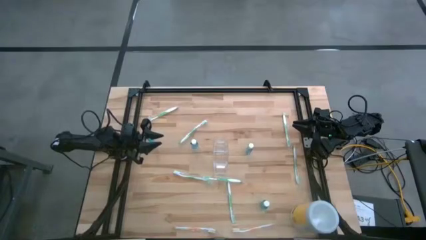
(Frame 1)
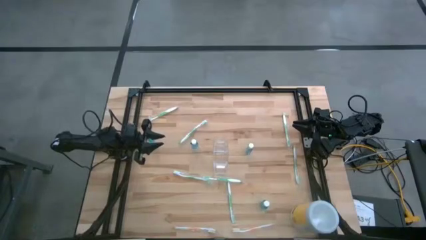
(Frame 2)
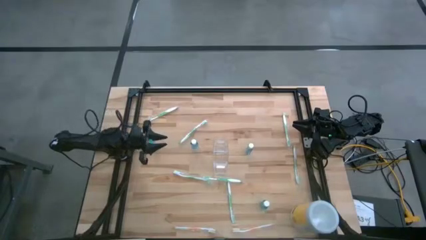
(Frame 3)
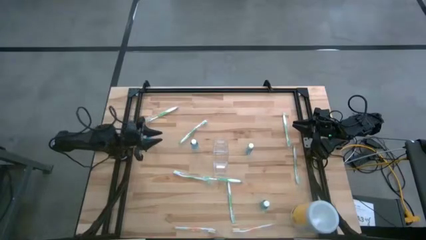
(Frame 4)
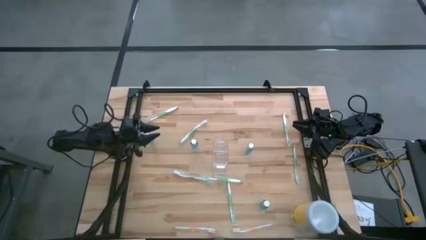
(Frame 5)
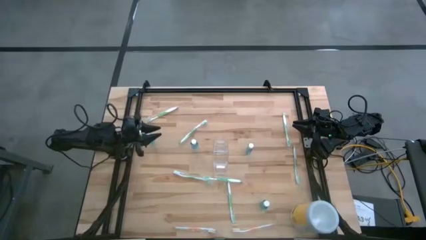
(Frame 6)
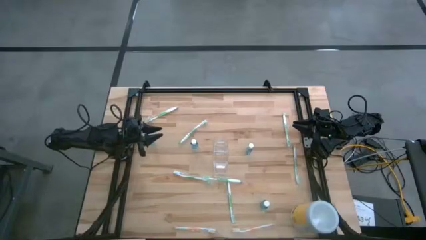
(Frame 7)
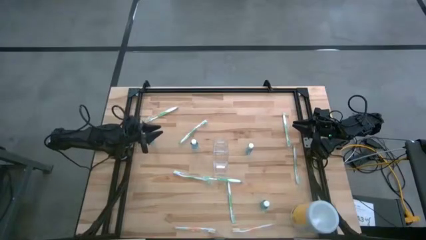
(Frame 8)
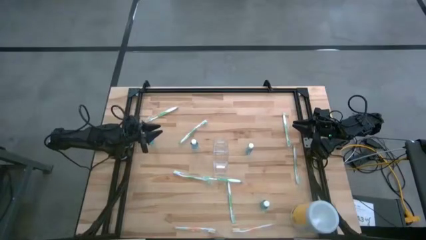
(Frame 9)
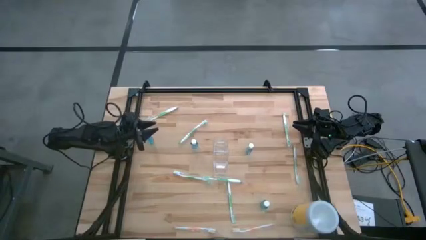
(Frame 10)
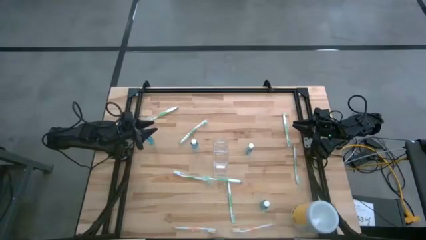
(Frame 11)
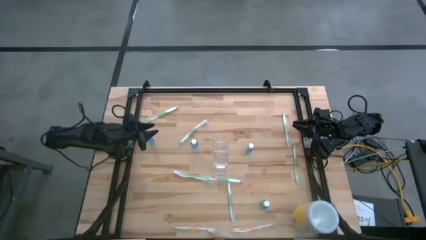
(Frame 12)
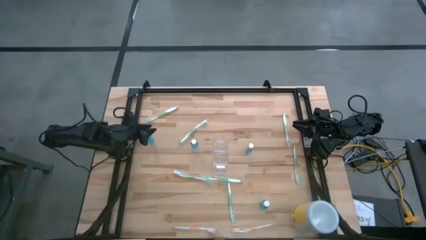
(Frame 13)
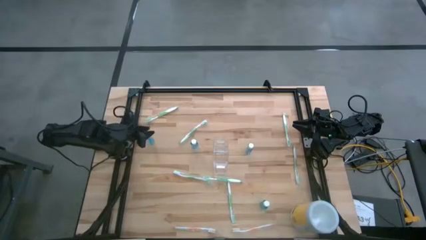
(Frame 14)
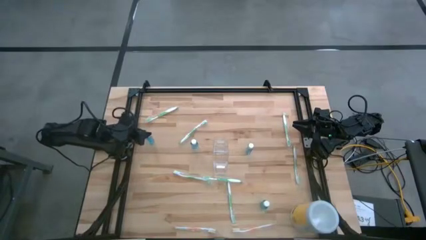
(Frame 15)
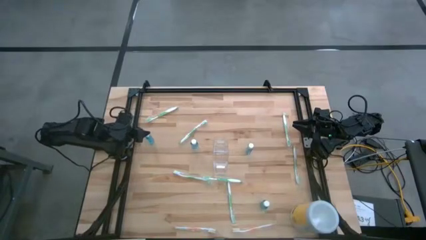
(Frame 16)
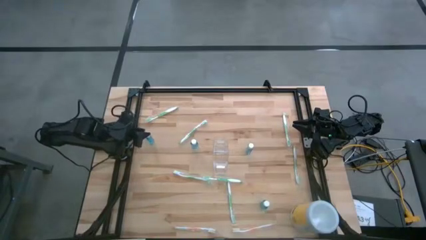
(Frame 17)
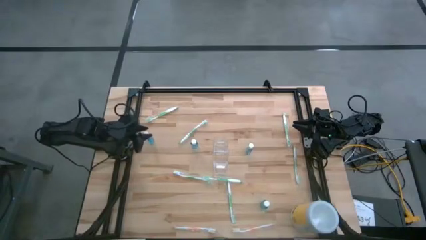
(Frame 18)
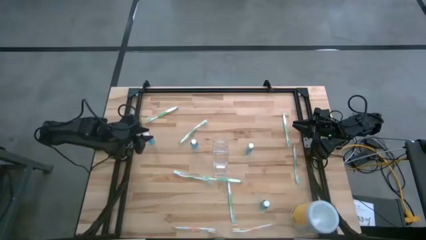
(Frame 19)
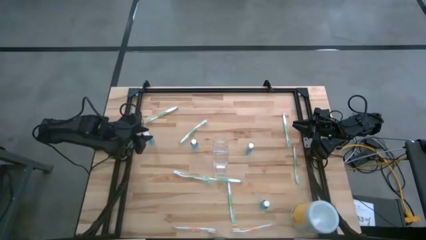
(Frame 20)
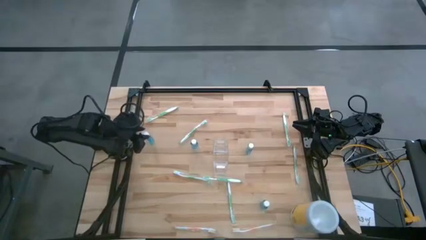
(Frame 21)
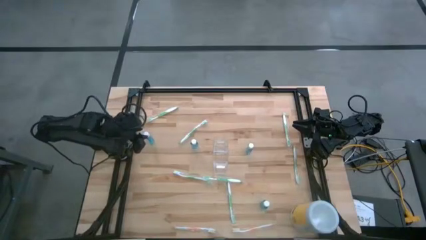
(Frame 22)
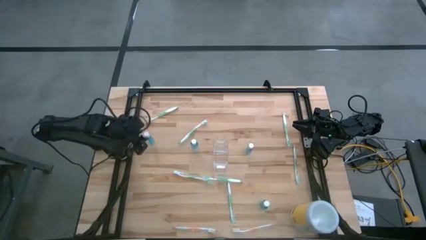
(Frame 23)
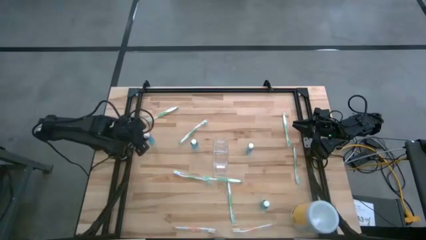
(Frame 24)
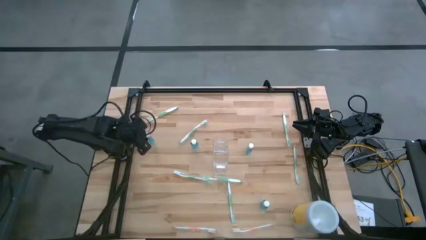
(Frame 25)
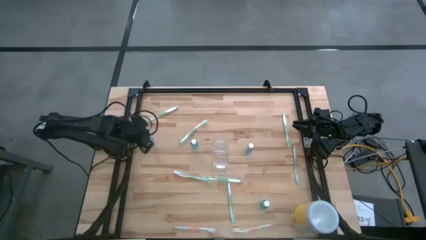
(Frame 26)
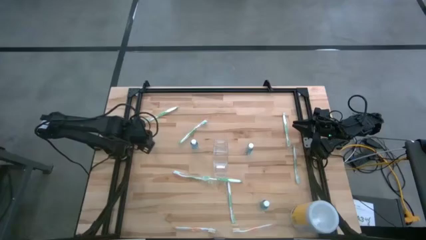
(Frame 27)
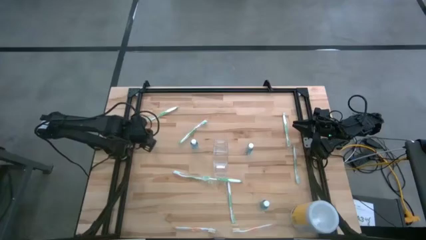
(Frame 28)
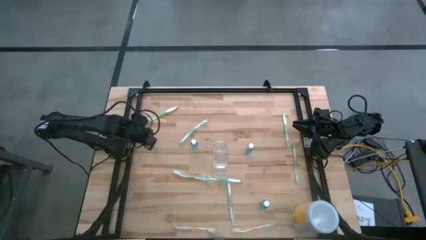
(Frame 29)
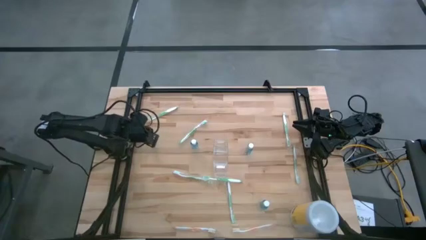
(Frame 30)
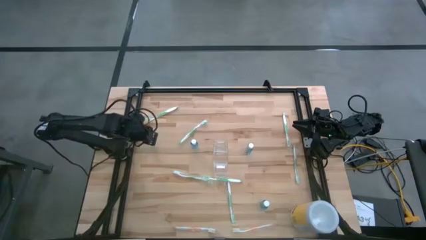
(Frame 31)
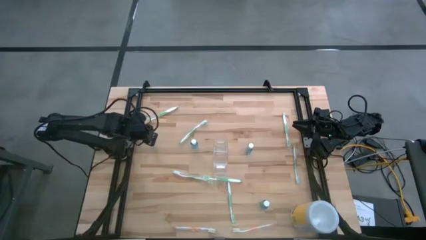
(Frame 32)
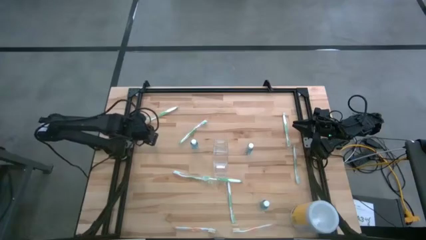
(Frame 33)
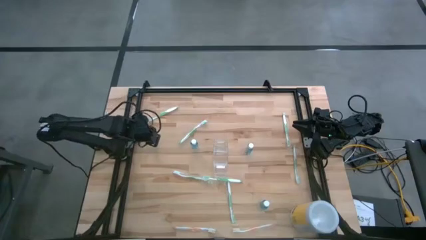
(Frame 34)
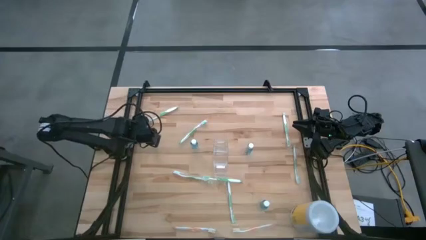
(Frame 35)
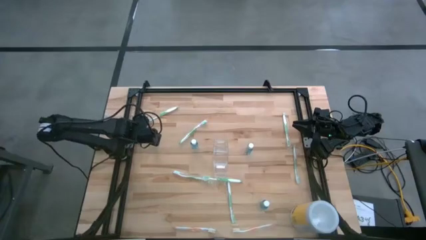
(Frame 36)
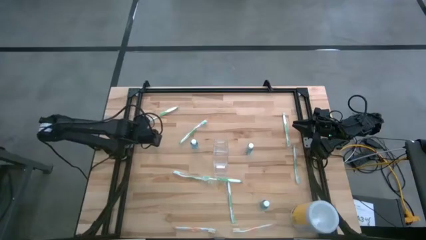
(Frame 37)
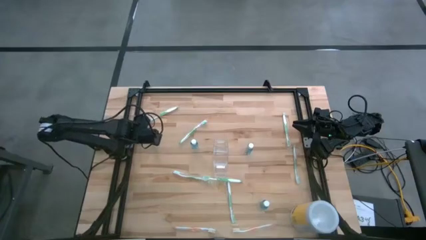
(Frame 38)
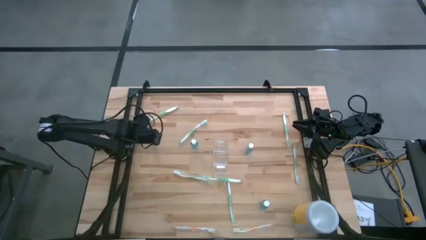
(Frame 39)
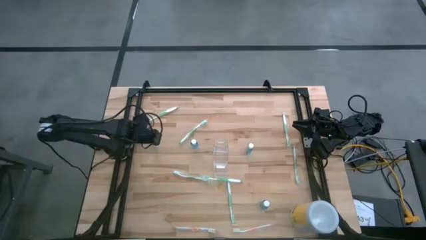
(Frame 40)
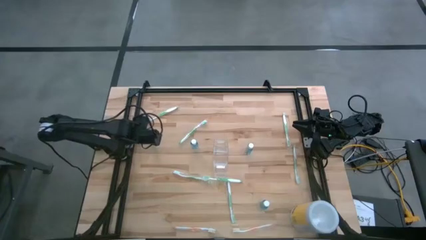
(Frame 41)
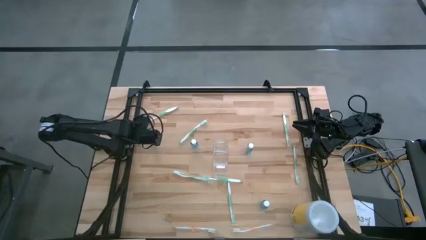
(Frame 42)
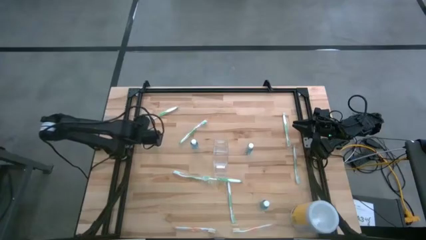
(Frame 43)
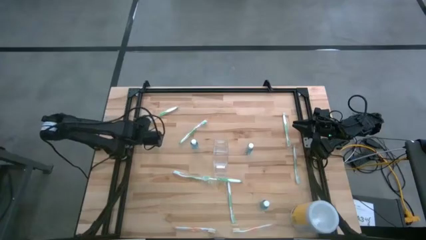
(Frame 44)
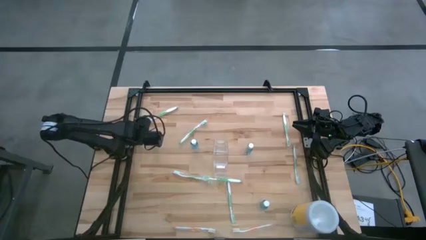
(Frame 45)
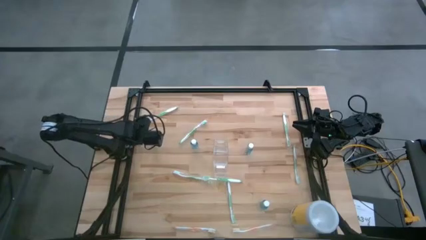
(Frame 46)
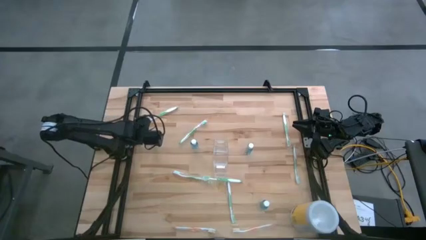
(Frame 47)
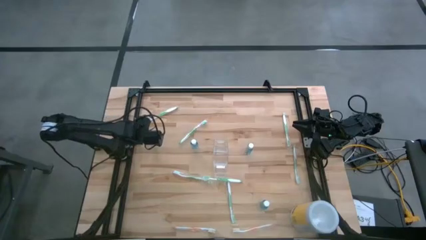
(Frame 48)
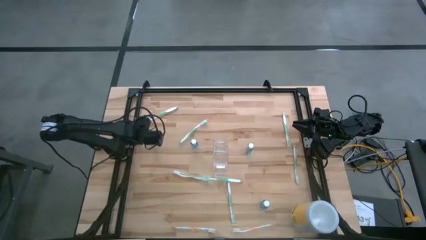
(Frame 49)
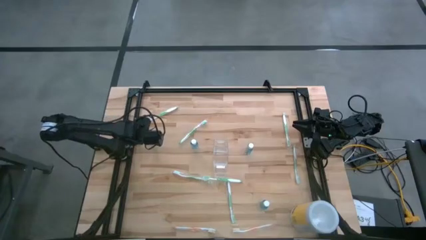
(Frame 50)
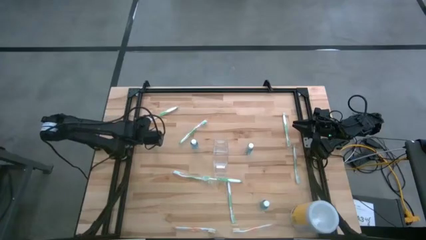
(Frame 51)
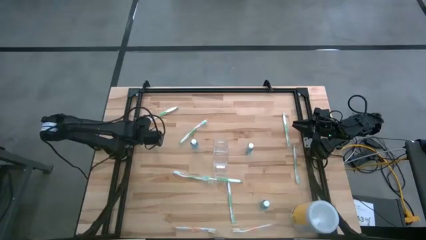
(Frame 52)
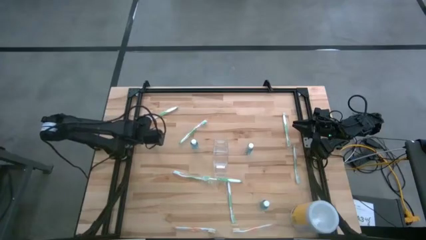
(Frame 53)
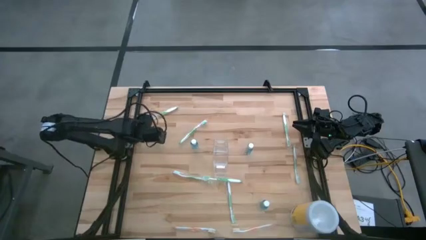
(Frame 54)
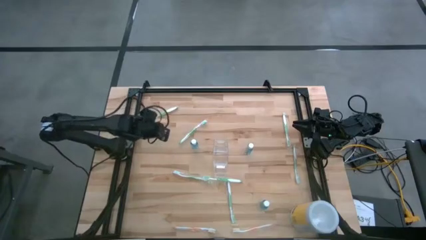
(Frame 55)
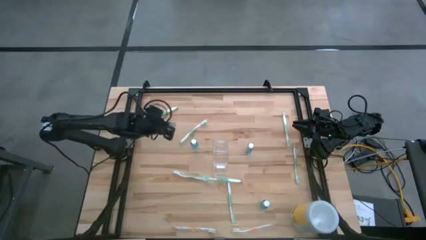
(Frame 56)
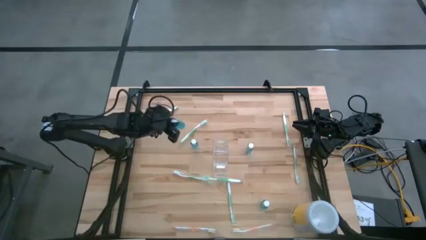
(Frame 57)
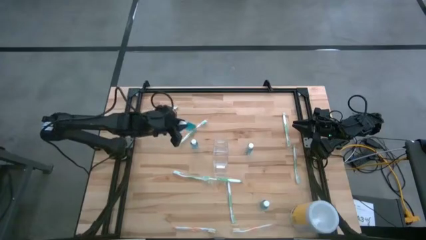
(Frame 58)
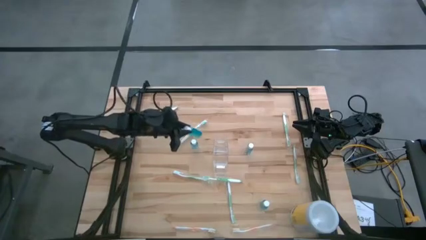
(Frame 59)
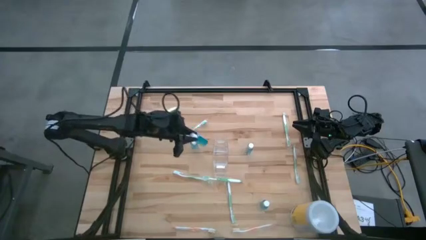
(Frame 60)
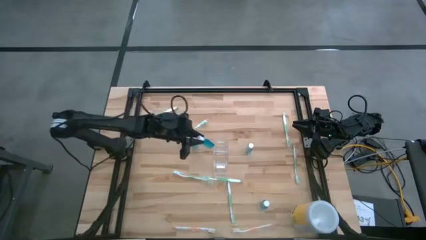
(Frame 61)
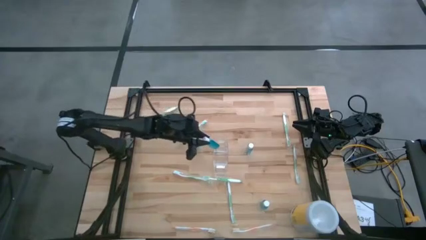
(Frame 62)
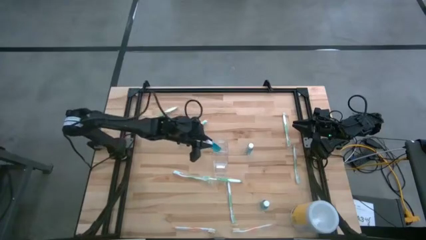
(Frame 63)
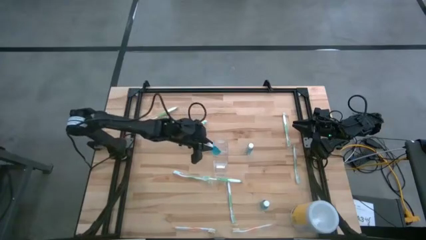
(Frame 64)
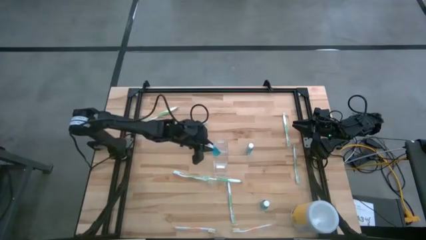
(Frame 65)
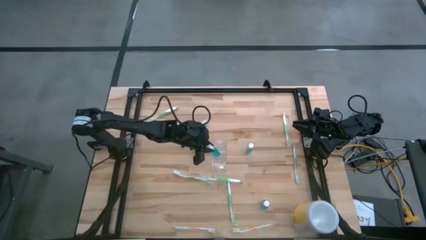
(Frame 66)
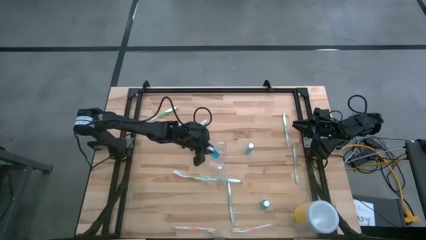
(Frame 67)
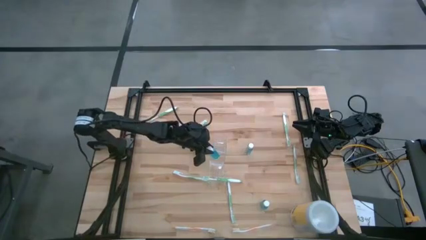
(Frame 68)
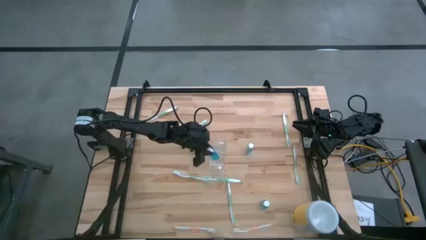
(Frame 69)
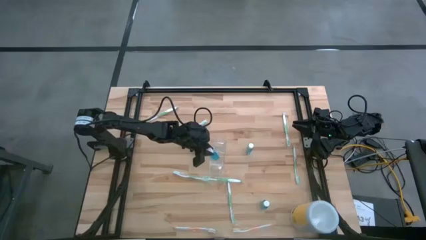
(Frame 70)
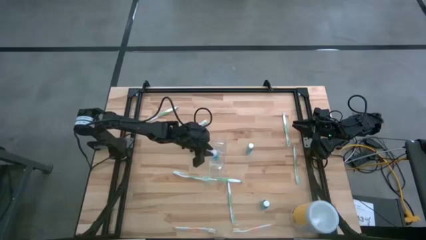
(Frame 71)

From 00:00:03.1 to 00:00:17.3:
Task: Pick & Place toothbrushing station
Put the blue bottle into the middle of the transparent organizer
